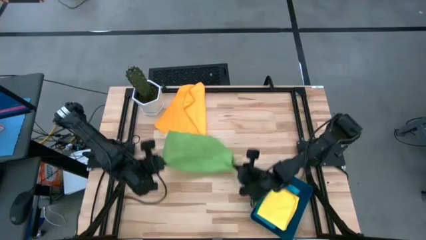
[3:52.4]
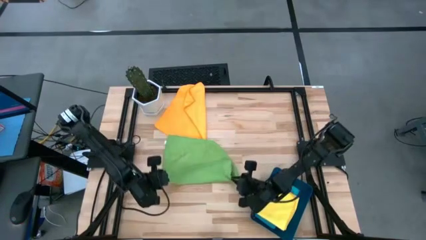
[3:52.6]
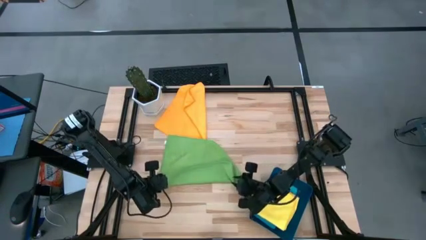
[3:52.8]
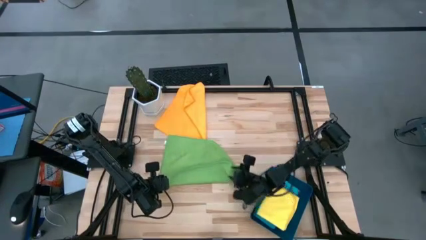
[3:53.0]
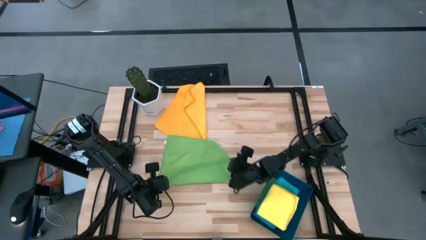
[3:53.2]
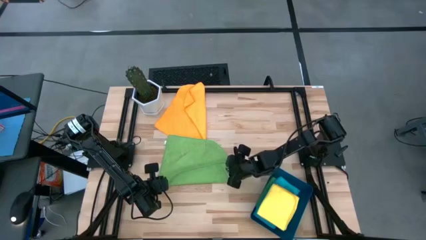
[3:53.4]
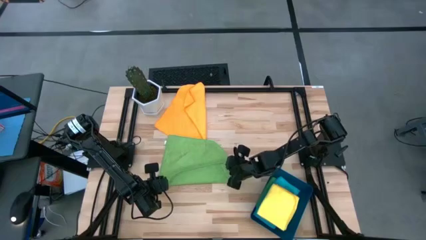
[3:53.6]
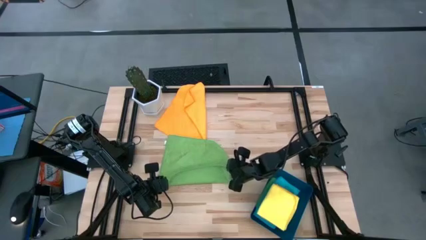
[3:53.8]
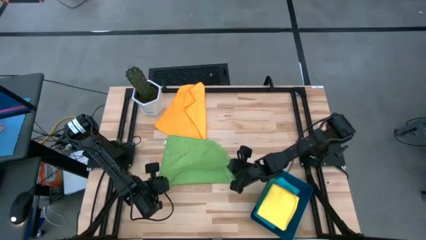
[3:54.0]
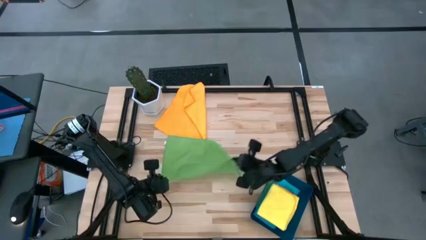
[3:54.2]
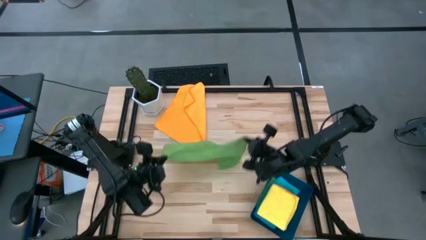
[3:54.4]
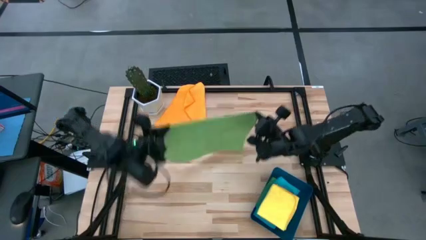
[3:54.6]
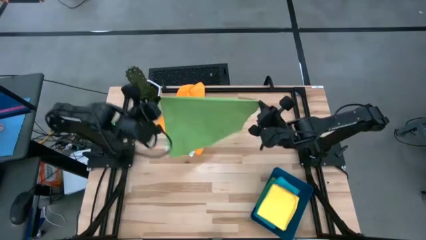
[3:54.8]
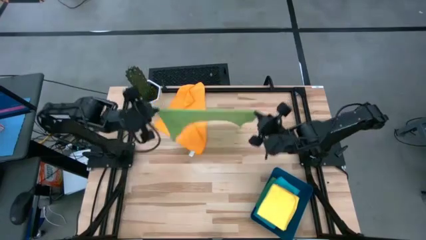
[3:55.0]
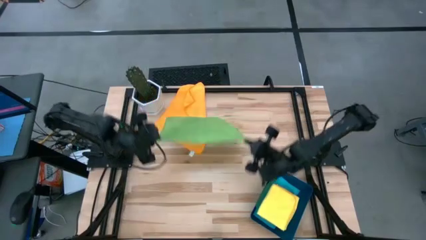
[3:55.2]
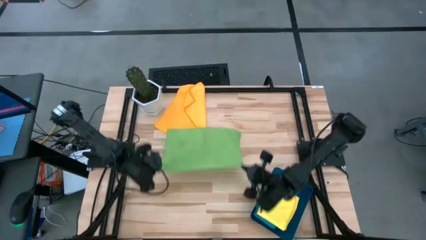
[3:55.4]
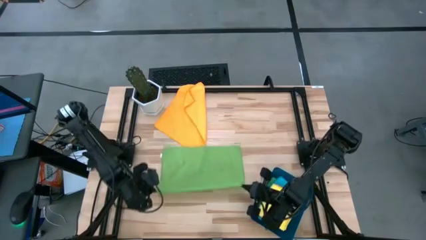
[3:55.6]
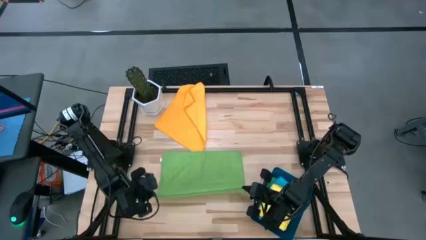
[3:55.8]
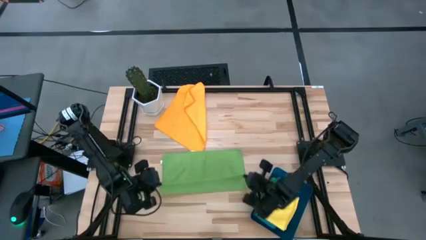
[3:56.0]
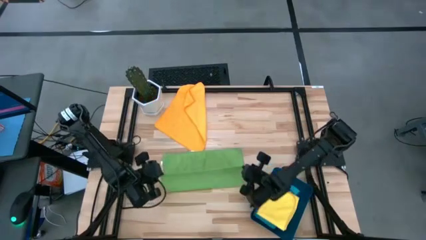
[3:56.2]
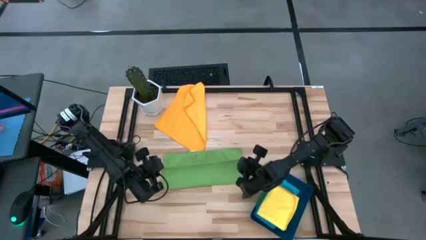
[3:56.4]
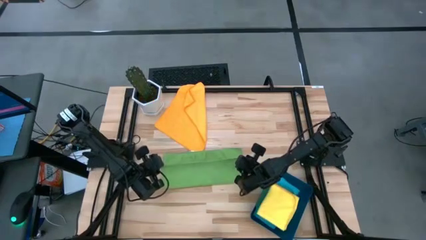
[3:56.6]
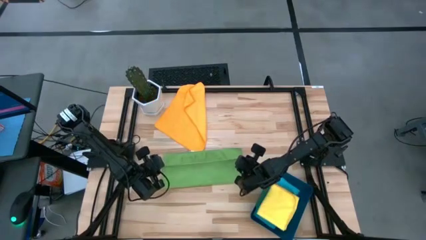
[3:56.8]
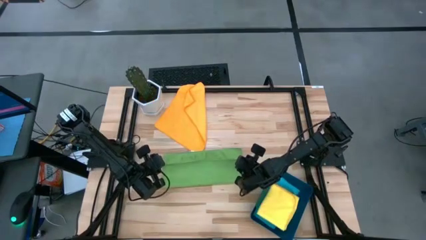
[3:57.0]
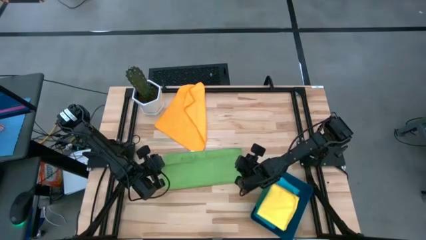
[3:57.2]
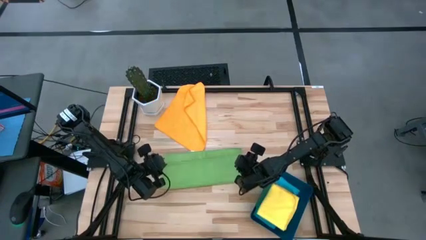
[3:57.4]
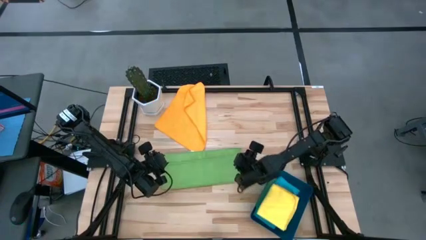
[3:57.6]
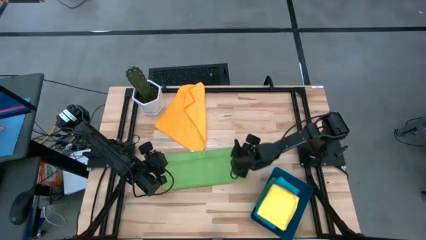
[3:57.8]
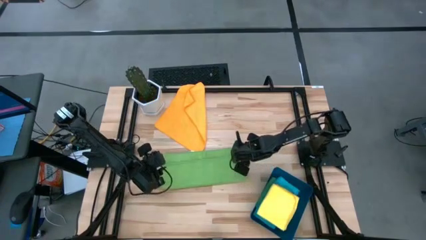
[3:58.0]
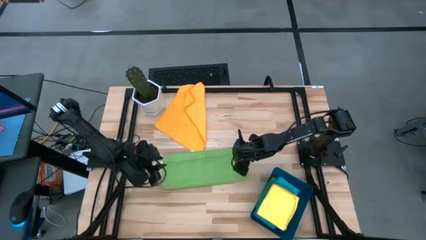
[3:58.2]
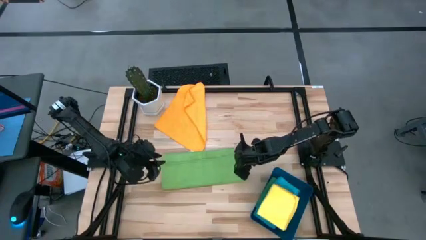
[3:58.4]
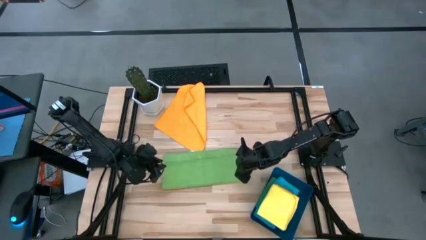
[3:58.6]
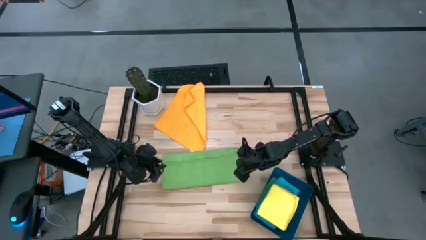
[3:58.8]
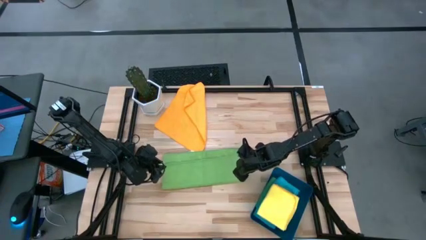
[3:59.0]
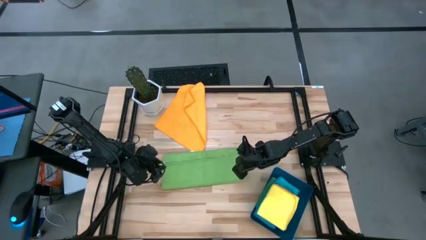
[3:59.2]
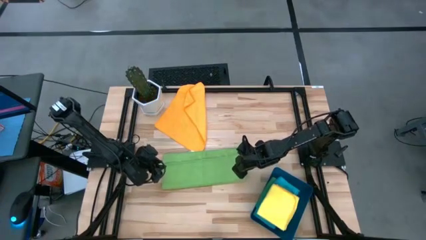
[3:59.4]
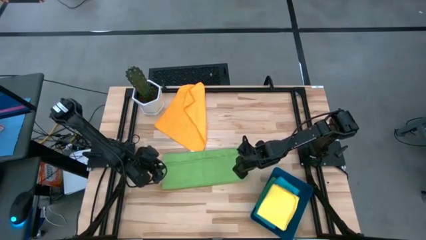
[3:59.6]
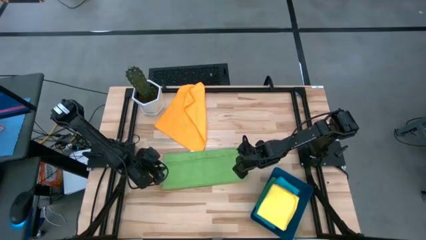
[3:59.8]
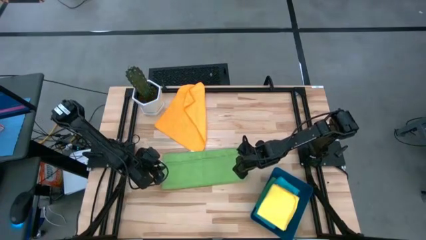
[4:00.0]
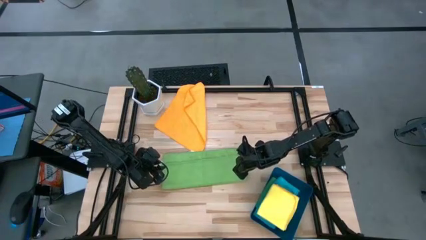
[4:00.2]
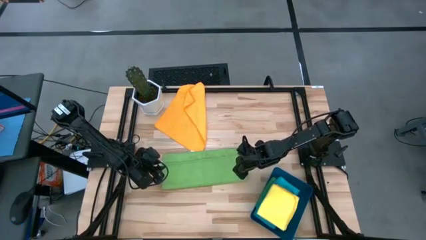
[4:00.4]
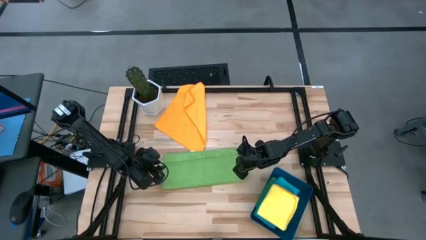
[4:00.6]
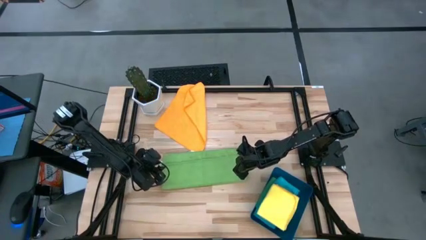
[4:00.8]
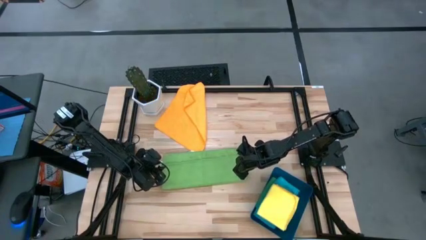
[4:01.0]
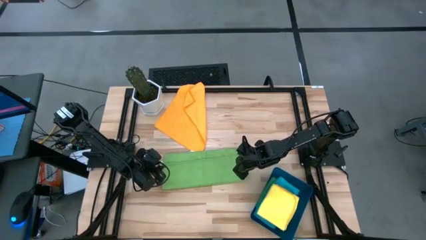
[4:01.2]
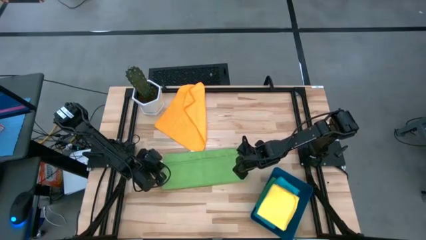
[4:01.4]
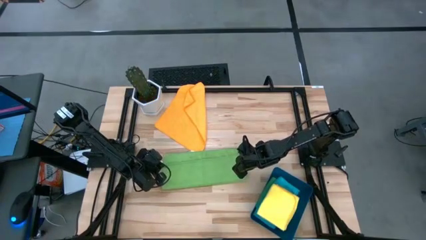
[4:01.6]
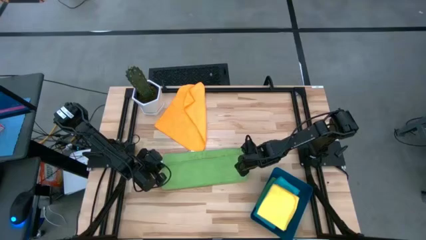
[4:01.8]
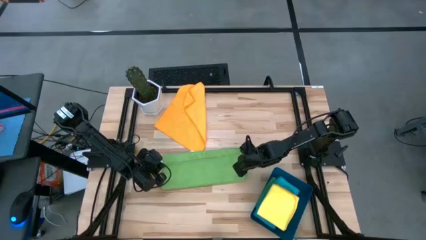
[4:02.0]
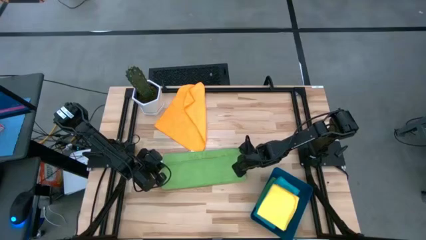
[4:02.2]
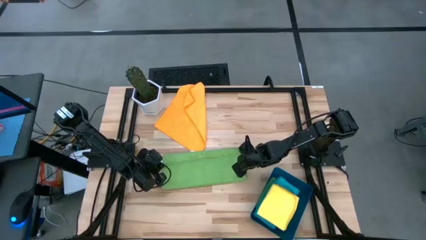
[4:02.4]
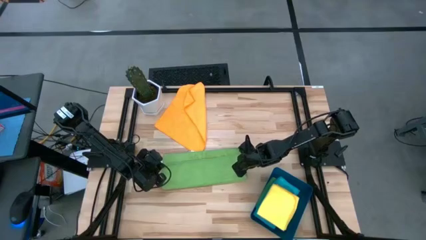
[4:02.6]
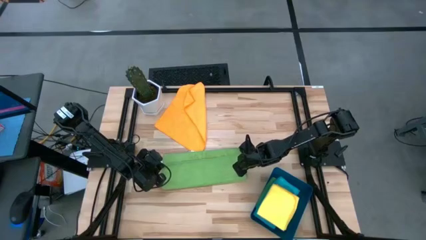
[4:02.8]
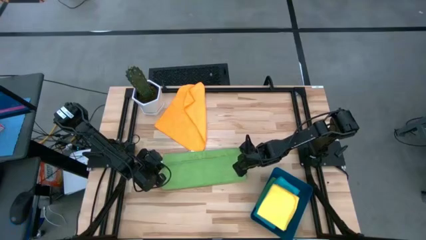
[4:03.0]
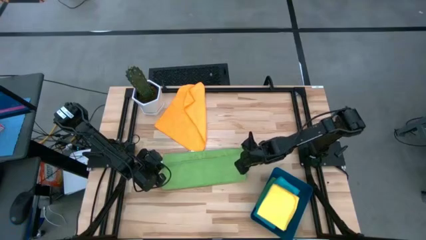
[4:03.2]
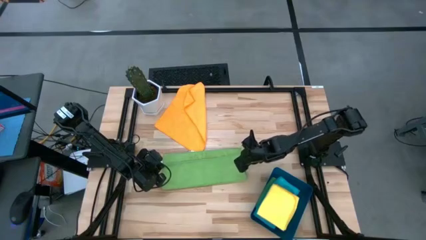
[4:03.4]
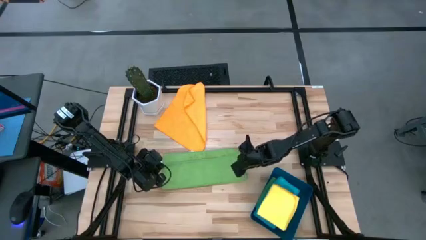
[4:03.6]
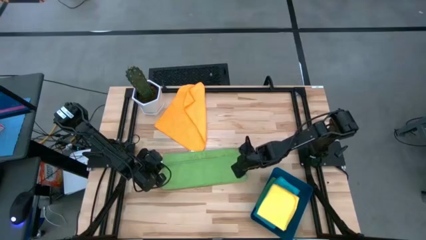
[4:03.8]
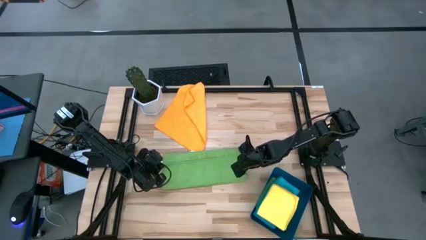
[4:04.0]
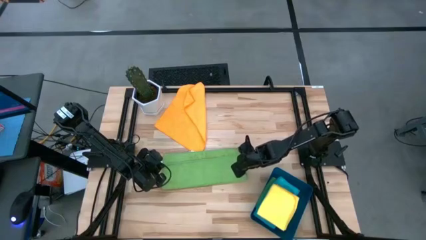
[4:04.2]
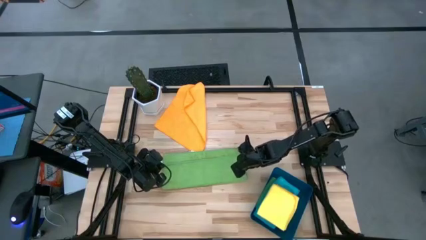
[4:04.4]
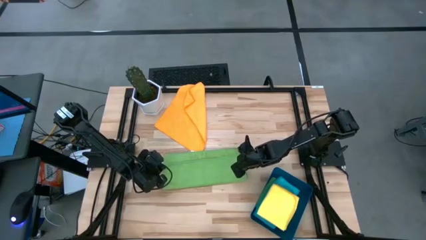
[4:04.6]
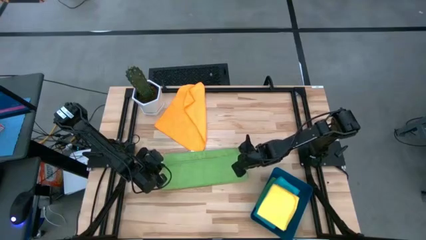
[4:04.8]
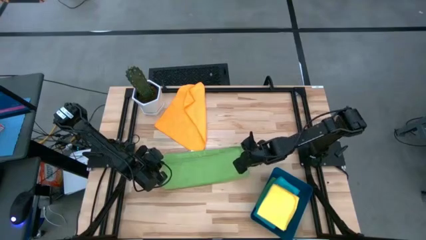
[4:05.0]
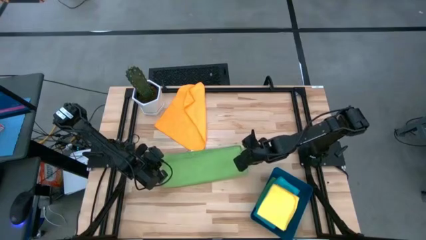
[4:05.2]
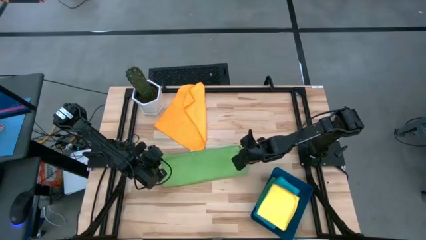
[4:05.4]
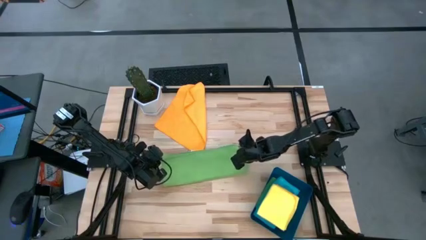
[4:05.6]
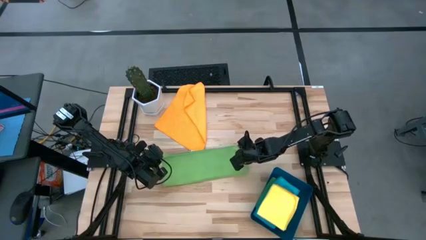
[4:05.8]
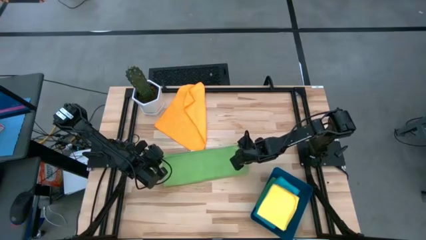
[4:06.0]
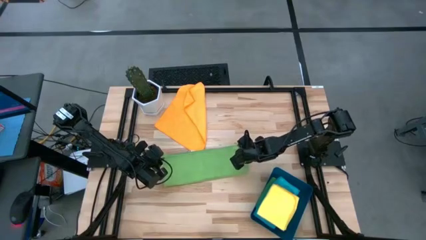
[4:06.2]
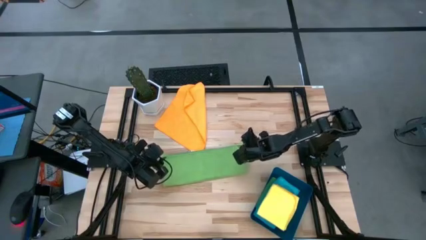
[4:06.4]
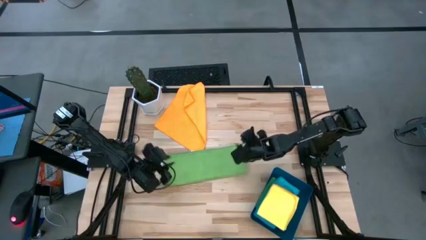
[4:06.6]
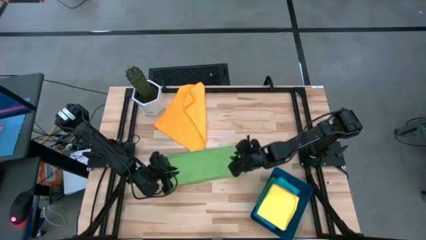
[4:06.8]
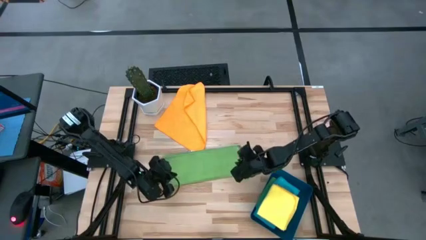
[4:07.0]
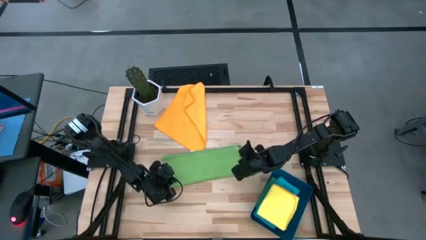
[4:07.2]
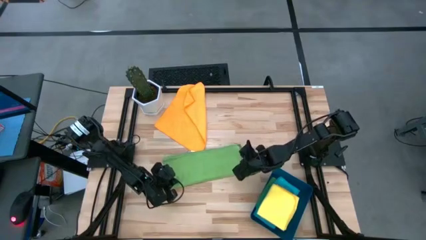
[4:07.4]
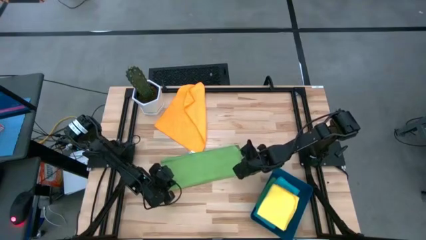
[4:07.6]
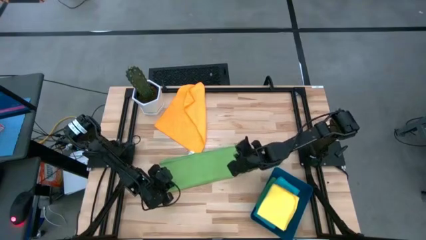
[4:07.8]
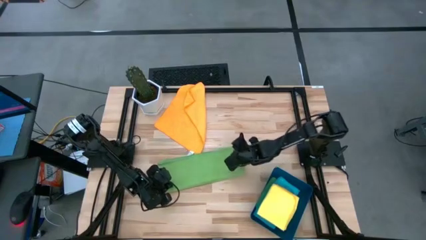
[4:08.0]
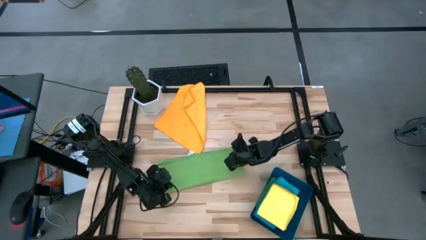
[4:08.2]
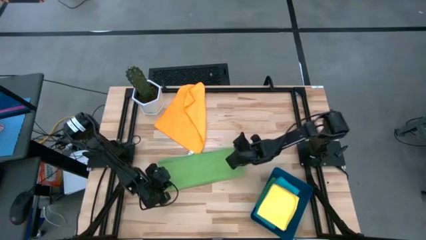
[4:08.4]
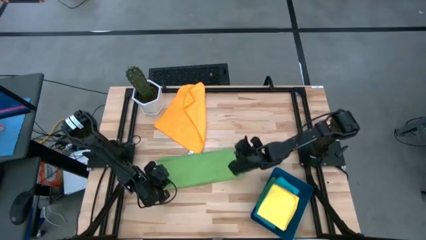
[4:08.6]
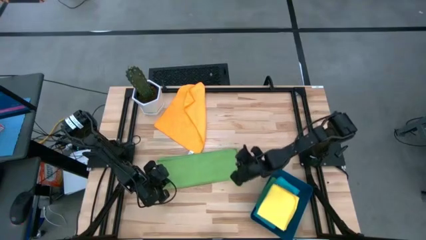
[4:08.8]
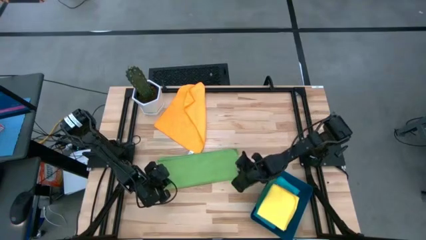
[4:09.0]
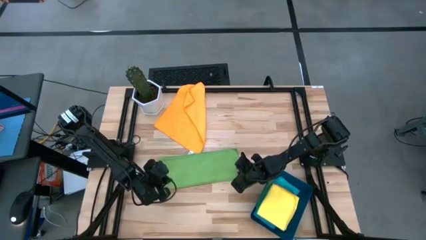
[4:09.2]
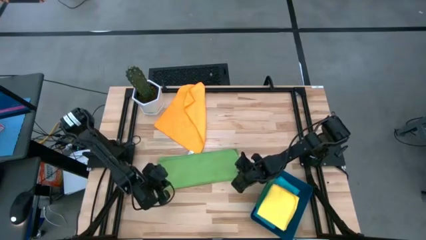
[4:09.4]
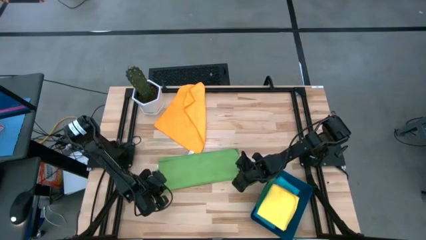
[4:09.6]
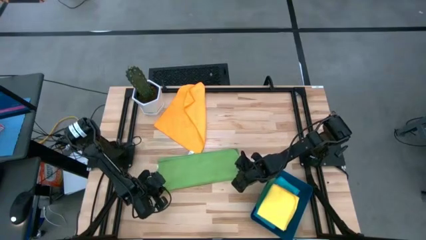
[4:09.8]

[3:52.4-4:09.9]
Task: Fold microfiber towels
Fold the green microfiber towel
